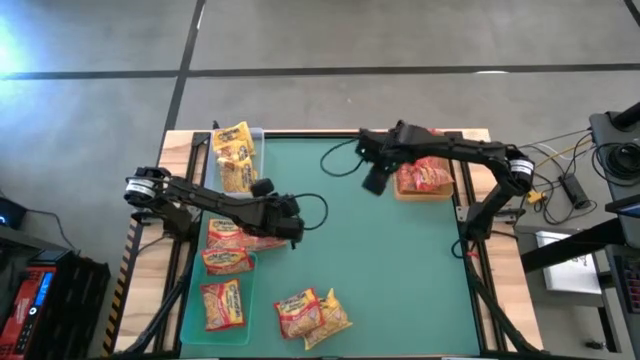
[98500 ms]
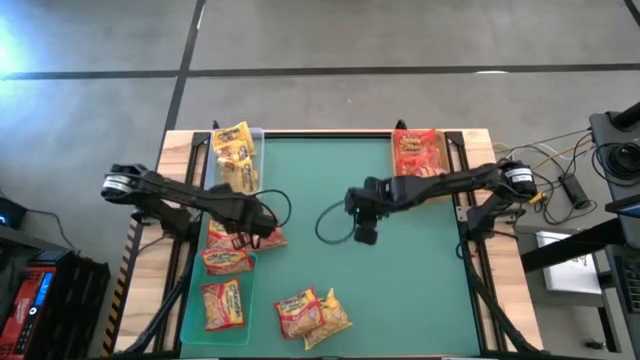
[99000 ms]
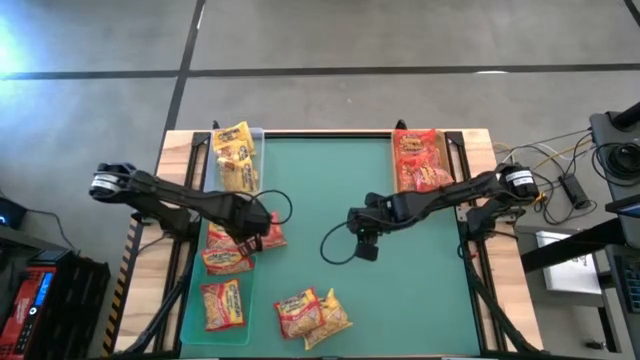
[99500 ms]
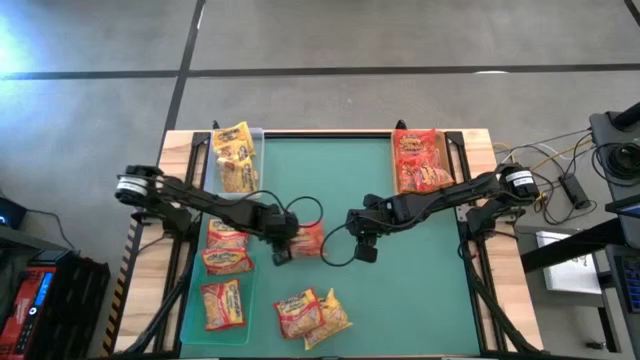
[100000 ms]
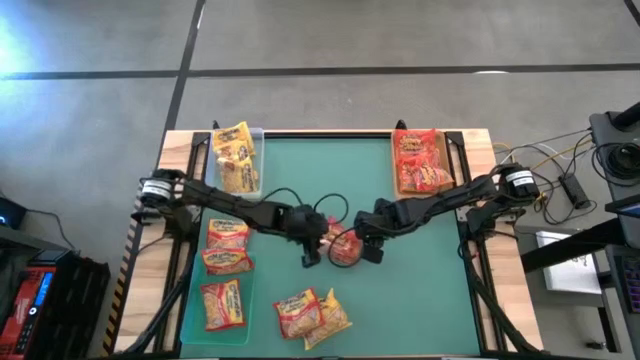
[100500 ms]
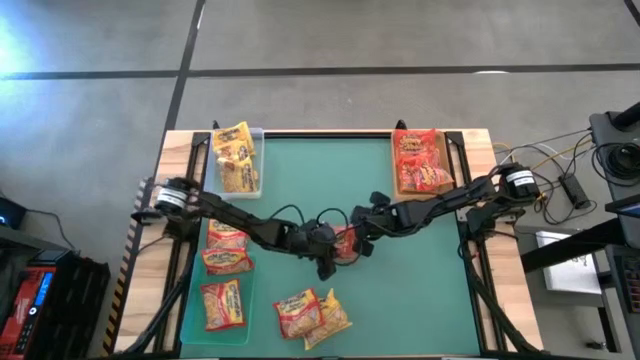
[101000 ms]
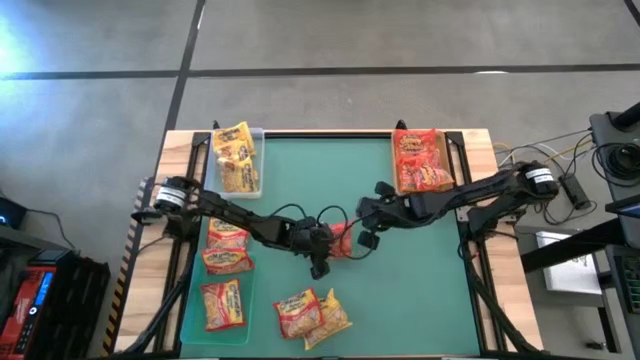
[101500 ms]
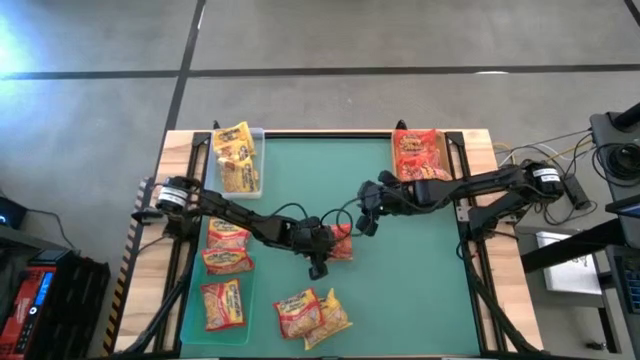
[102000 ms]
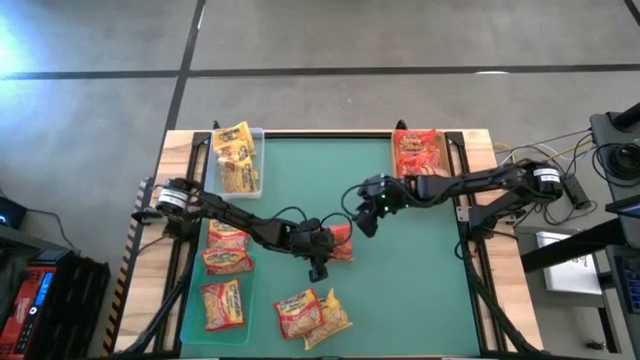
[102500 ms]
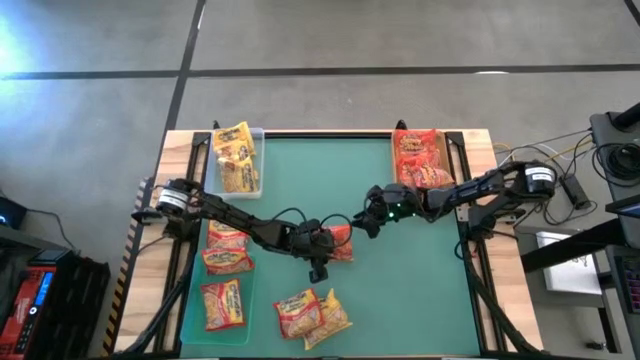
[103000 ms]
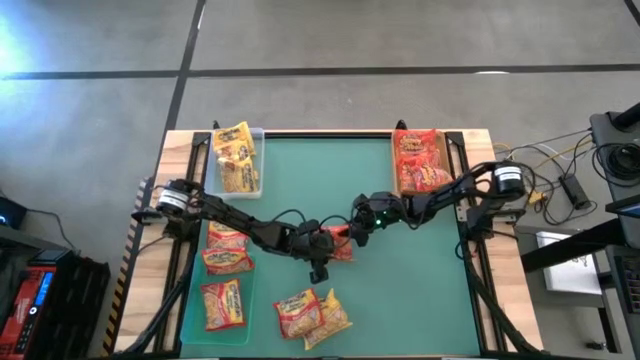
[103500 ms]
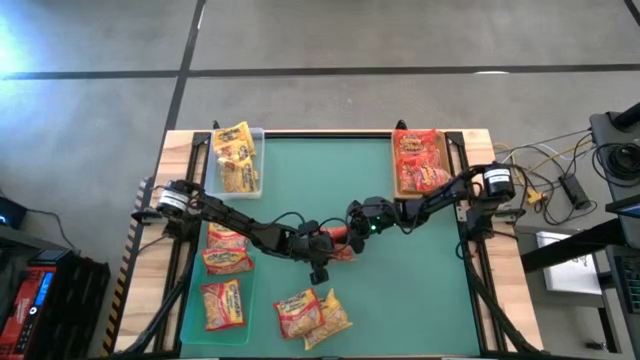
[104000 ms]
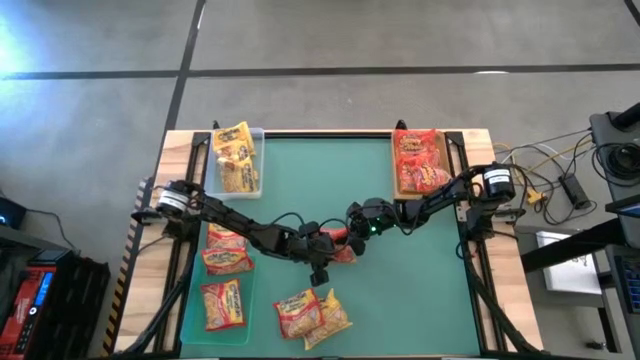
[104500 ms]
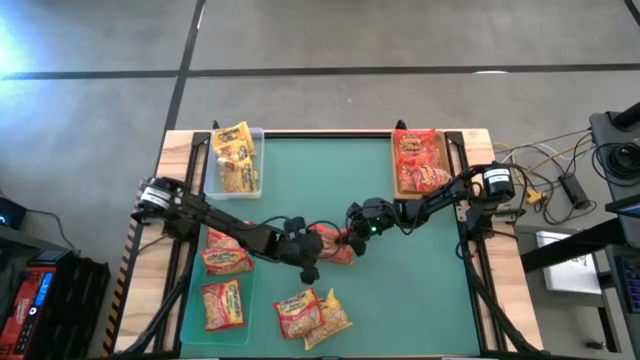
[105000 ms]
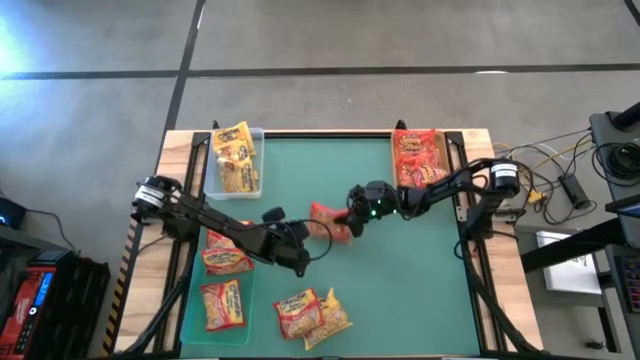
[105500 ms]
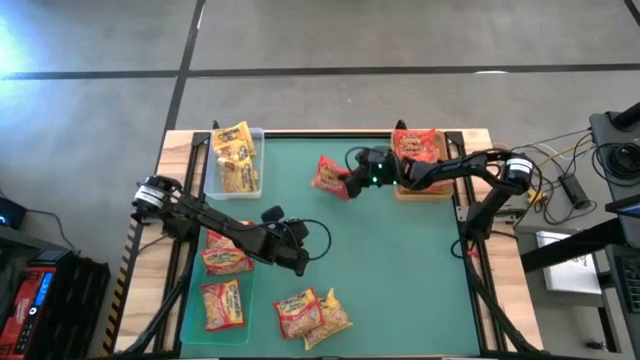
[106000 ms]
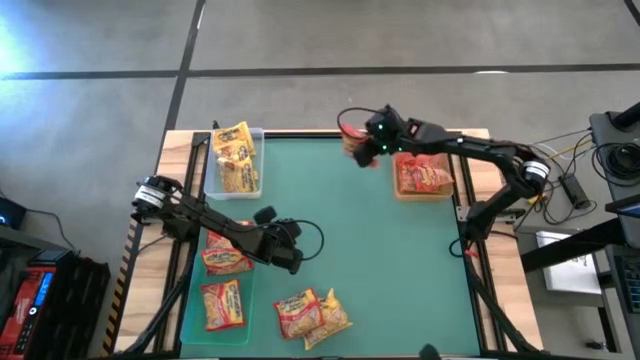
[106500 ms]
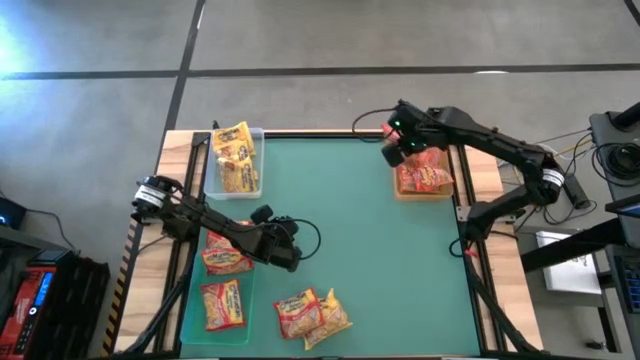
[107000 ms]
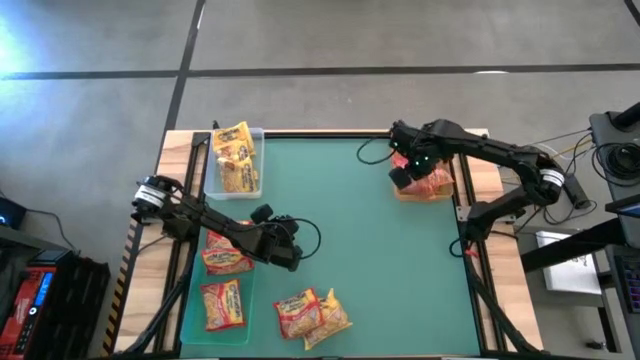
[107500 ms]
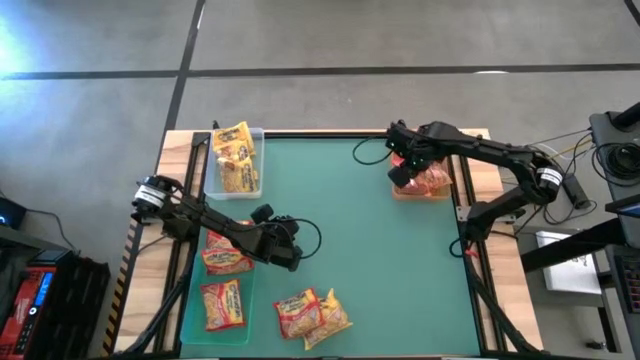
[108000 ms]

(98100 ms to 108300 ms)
Task: Sort Maruchan noodles
Put the orange noodle pack into the orange bin

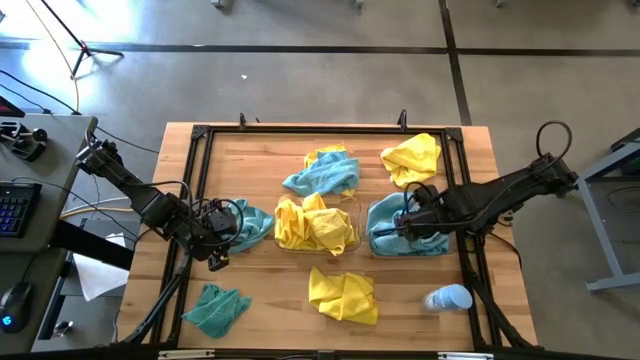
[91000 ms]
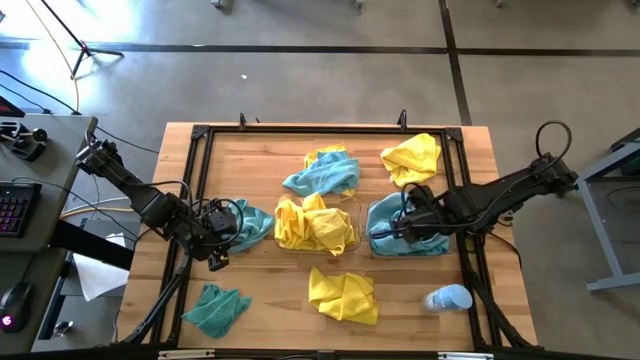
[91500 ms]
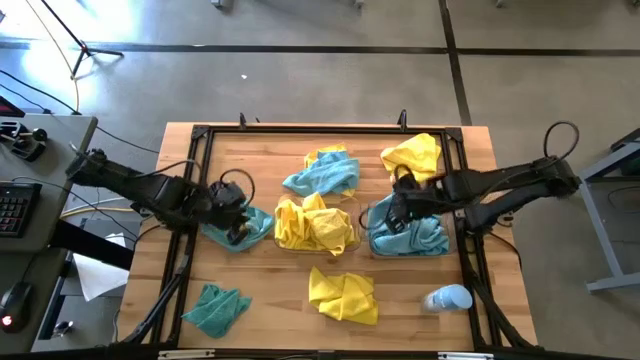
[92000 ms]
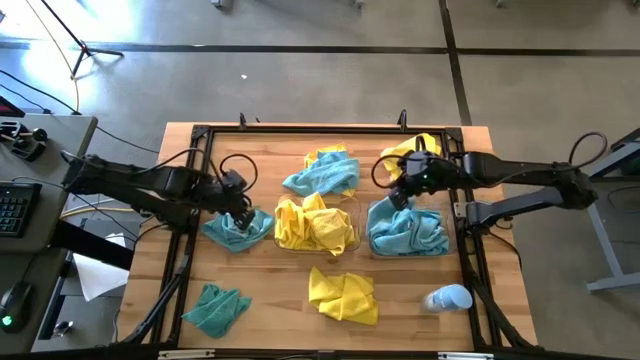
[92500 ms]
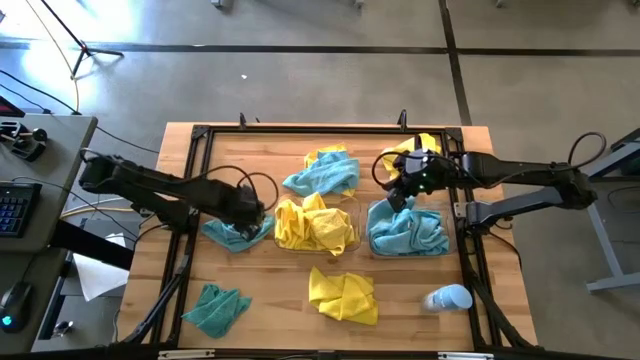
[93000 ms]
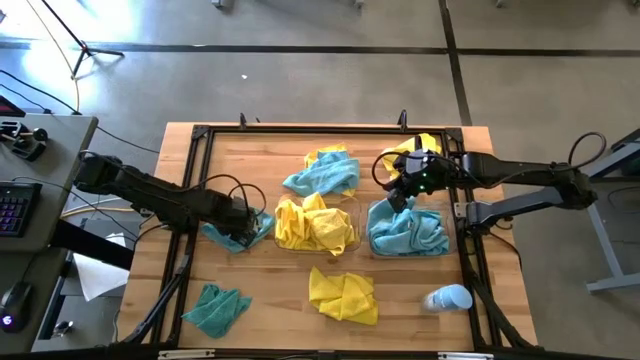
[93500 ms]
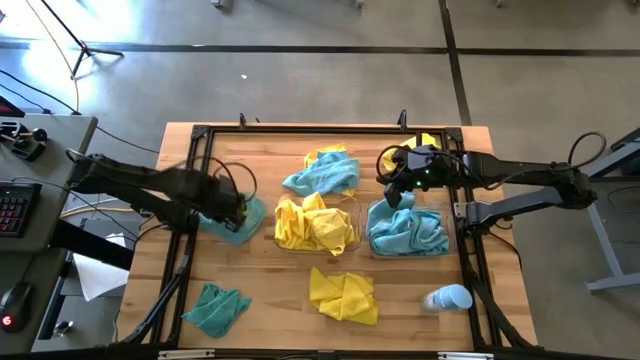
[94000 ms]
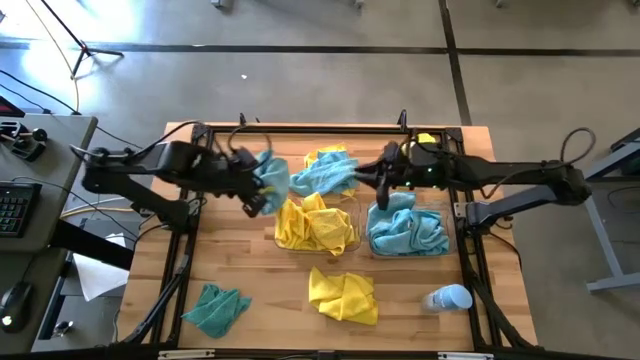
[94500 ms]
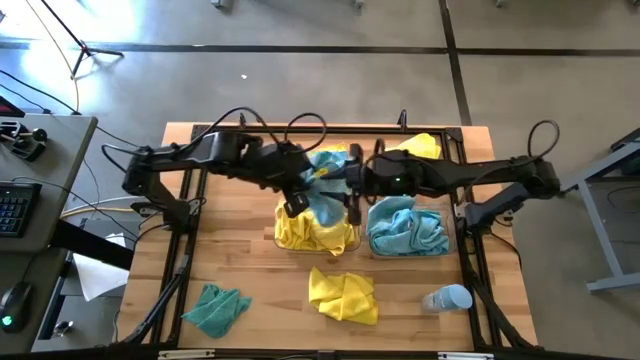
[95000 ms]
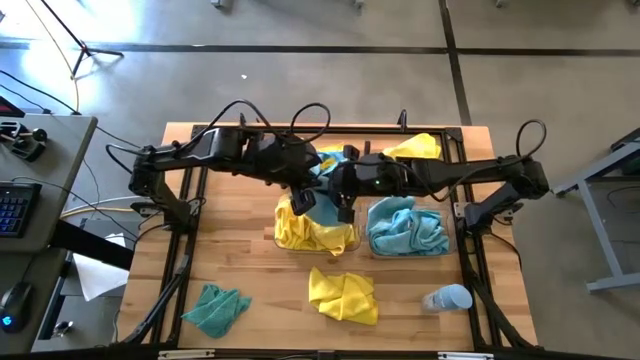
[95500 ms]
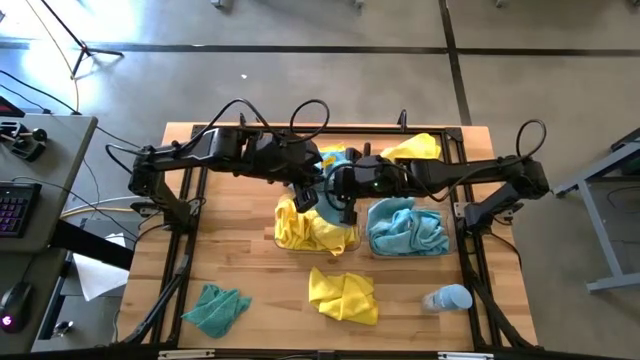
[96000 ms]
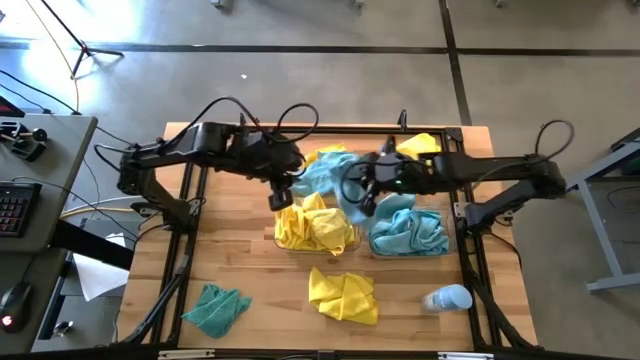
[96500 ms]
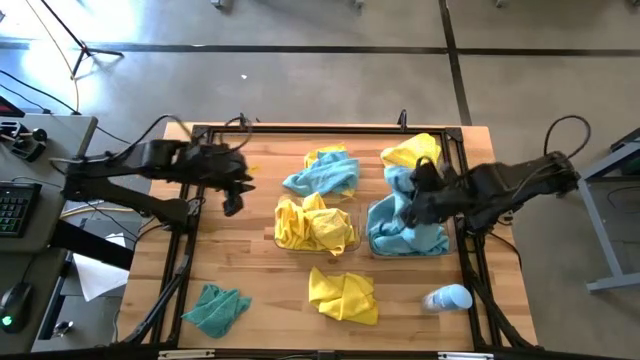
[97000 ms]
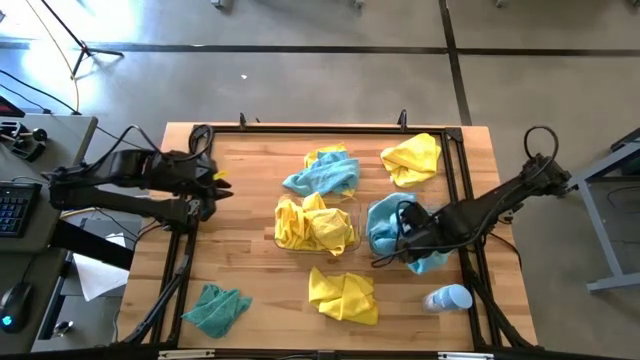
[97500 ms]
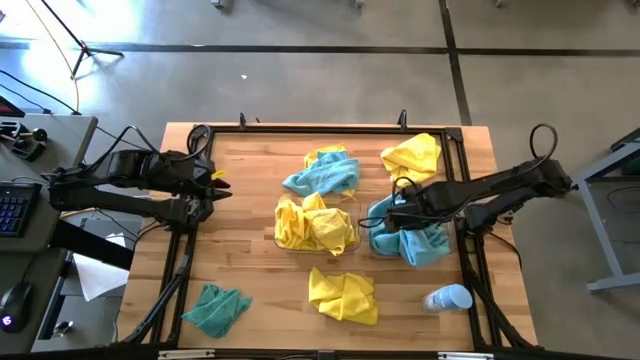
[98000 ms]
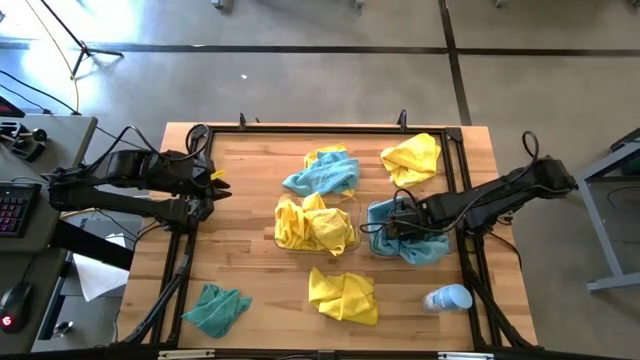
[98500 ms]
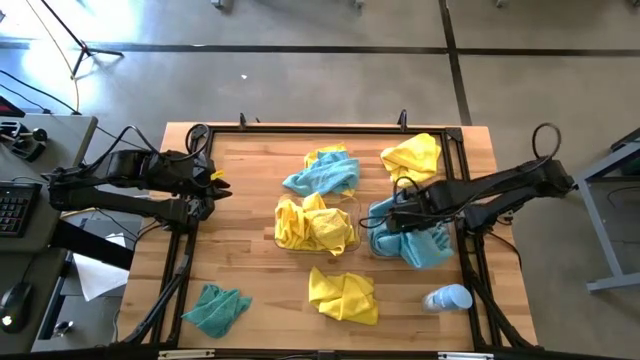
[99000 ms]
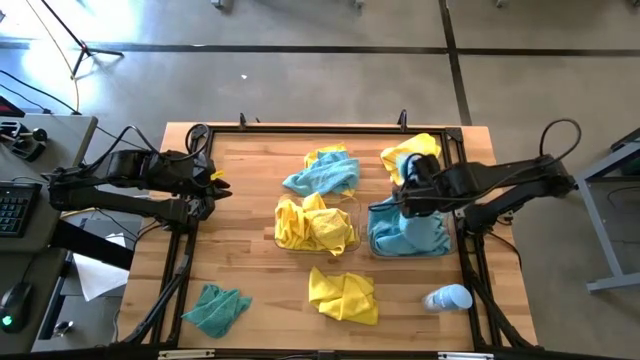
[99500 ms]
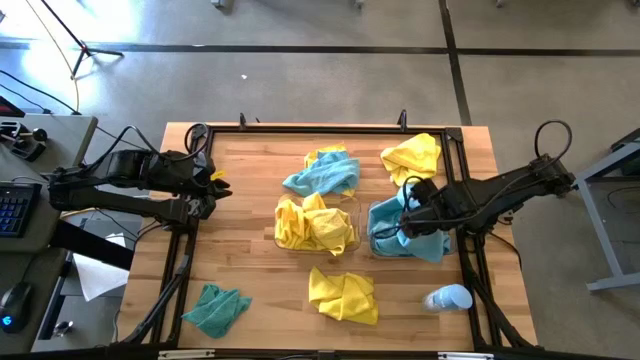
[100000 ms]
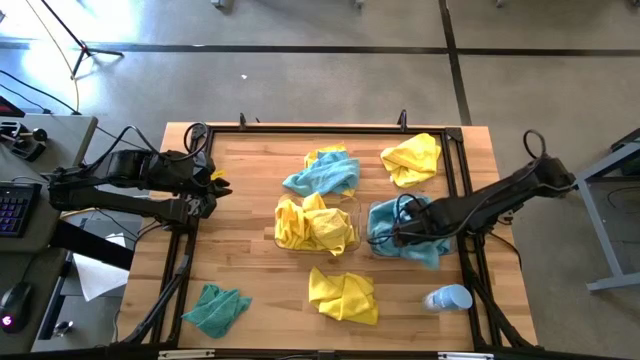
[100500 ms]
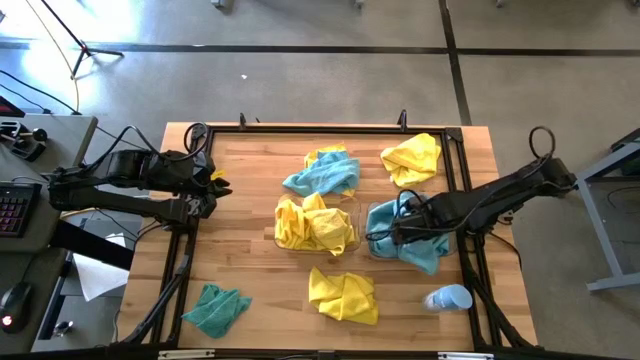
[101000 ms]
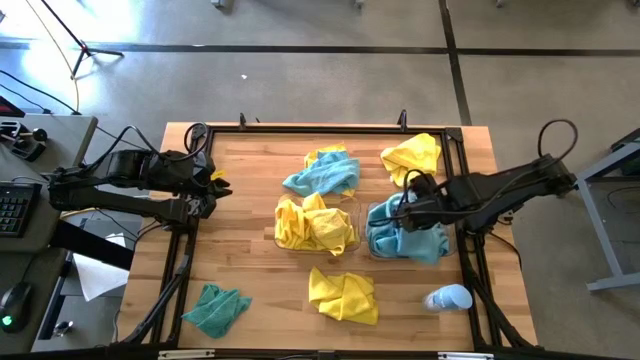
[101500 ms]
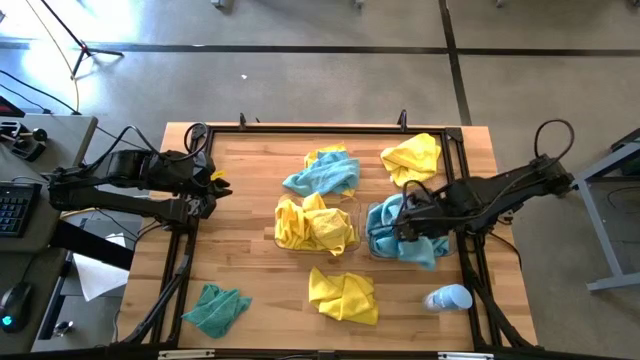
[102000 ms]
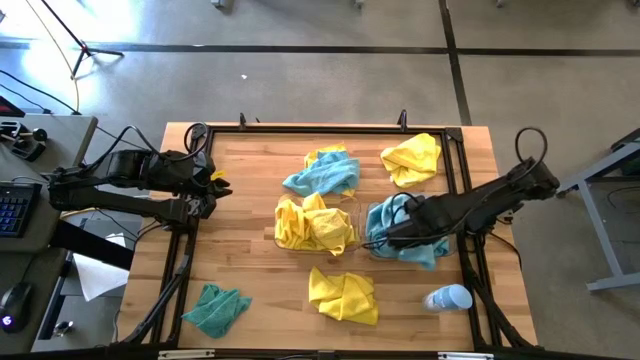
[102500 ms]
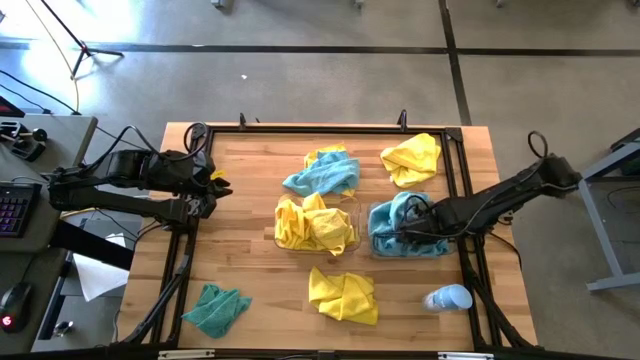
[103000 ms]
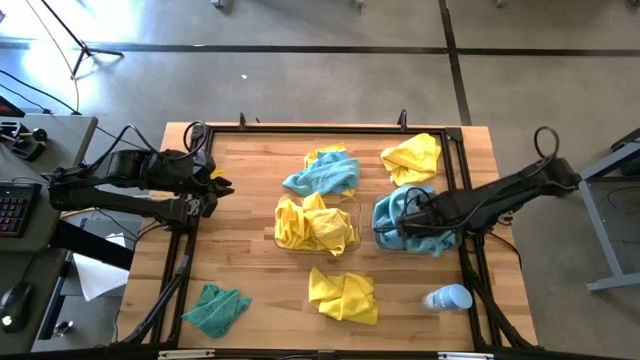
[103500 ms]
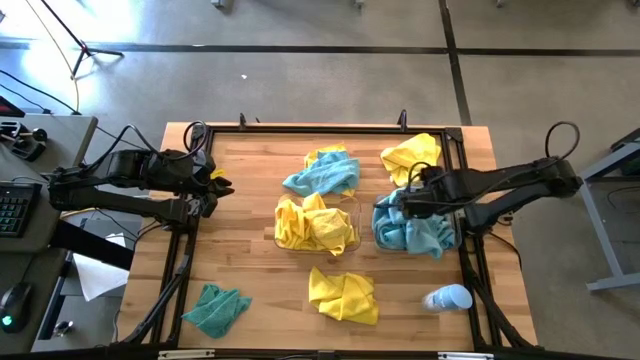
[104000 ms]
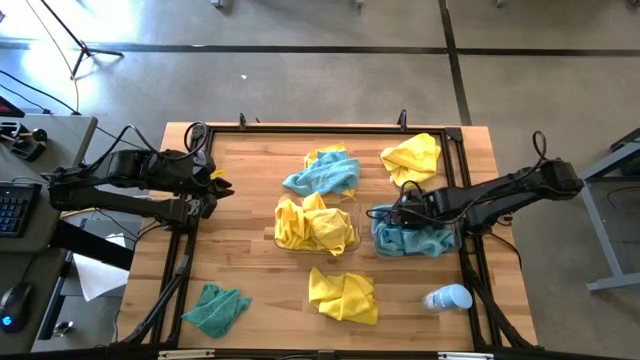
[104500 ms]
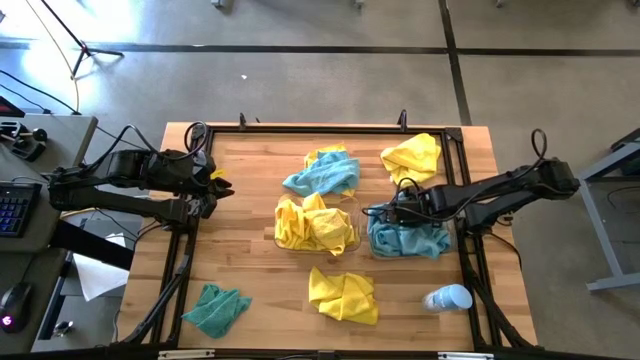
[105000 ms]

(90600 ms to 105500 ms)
Task: Sort microfiber towel by color & place in baskets
Put the blue microfiber cloth into the right transparent bin
